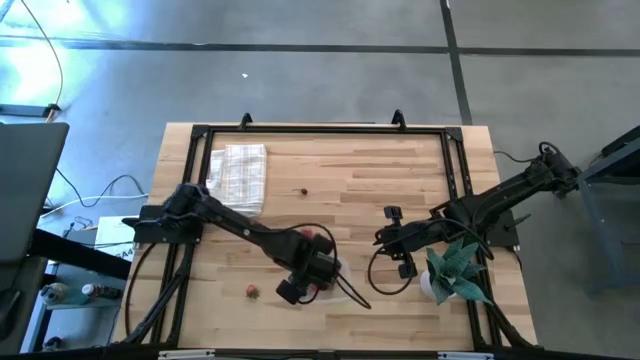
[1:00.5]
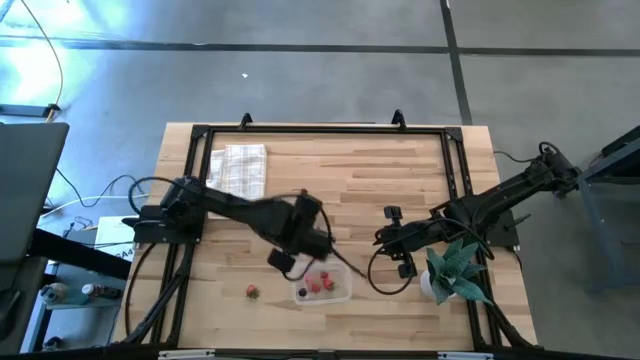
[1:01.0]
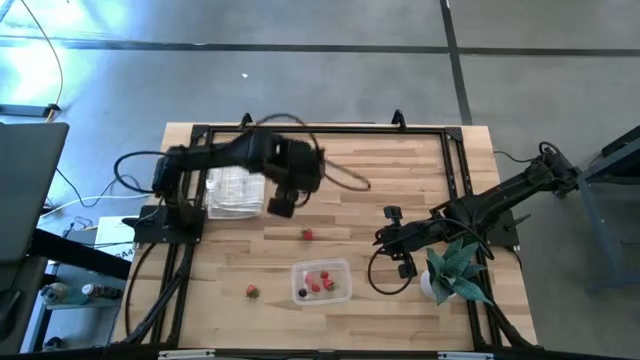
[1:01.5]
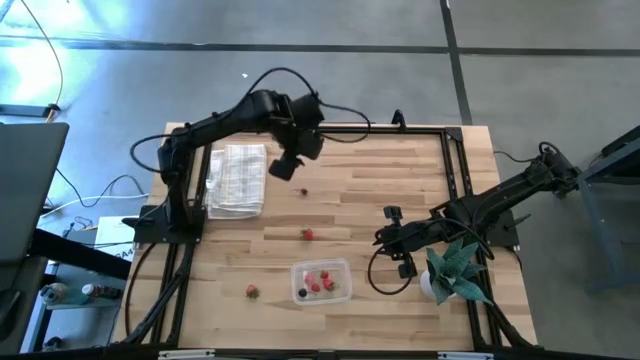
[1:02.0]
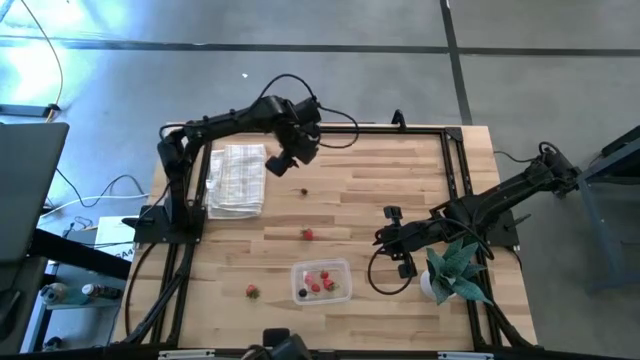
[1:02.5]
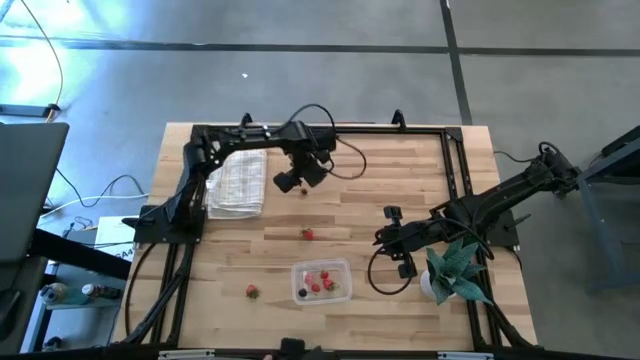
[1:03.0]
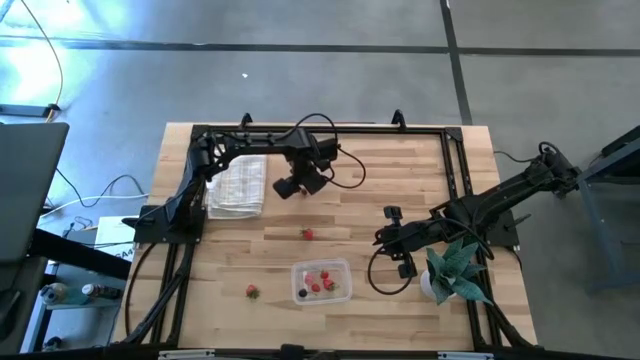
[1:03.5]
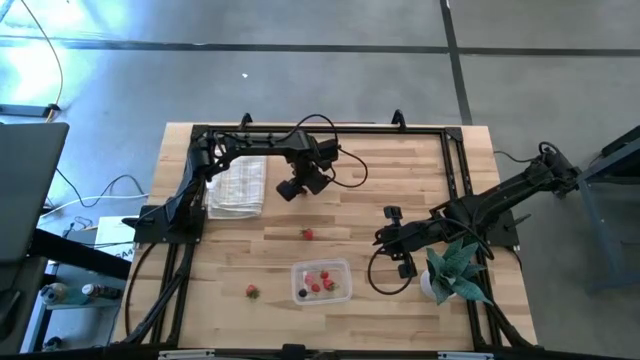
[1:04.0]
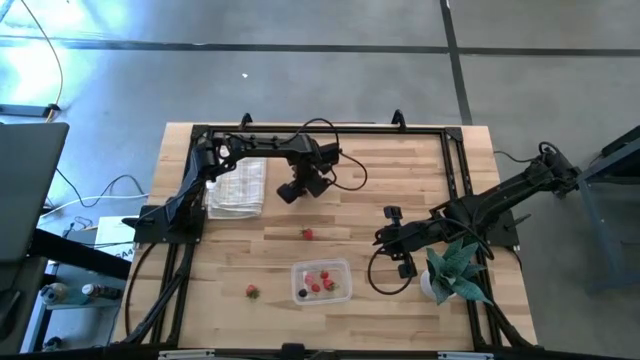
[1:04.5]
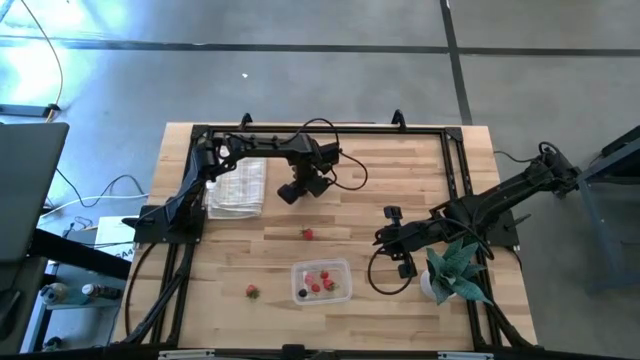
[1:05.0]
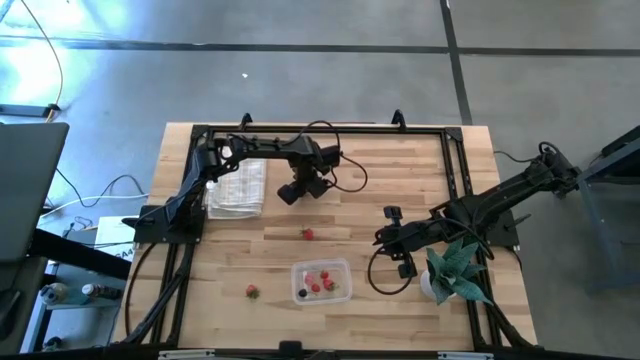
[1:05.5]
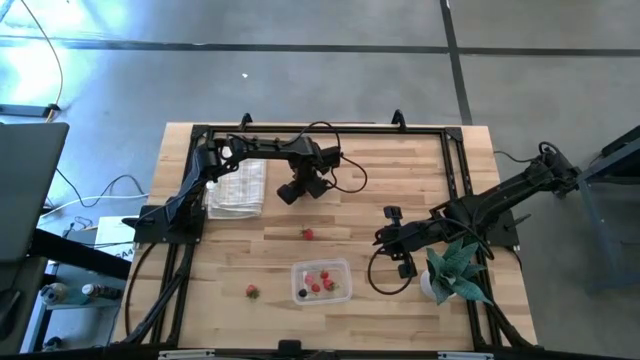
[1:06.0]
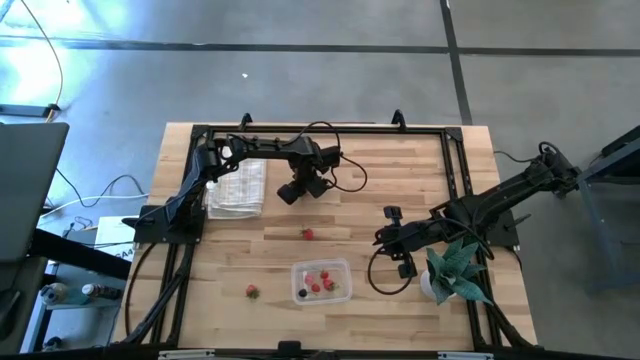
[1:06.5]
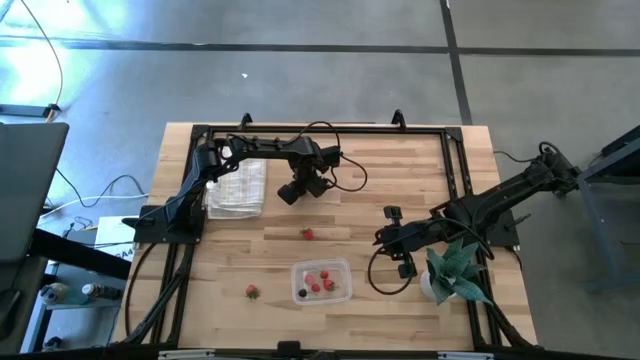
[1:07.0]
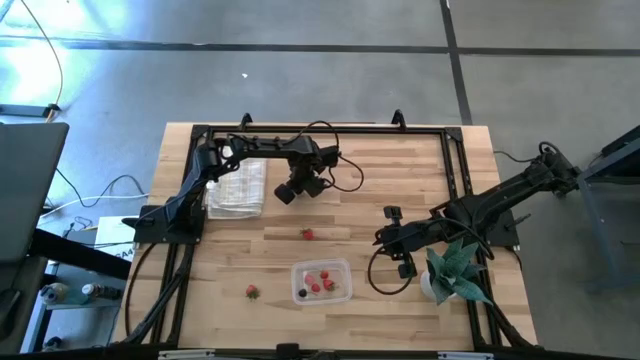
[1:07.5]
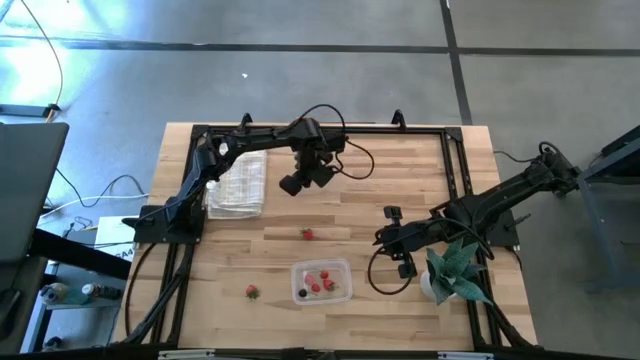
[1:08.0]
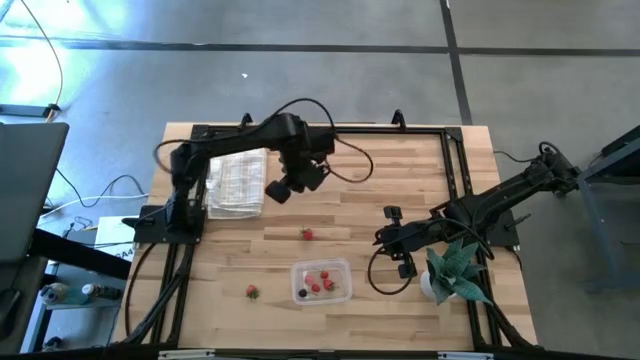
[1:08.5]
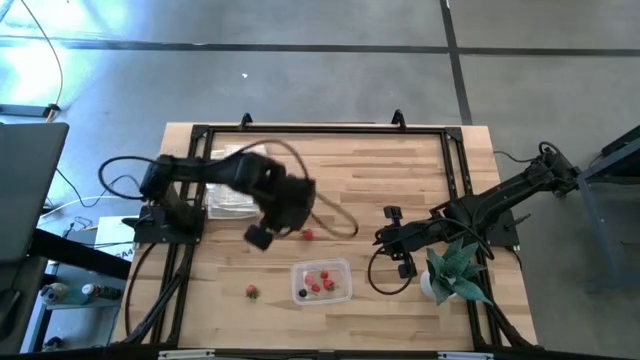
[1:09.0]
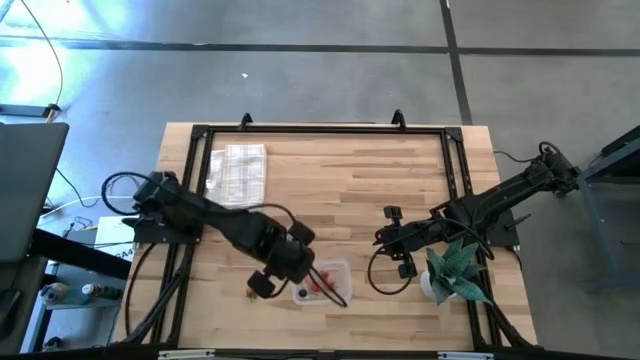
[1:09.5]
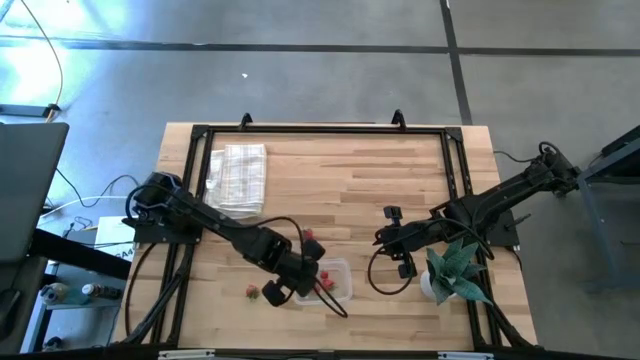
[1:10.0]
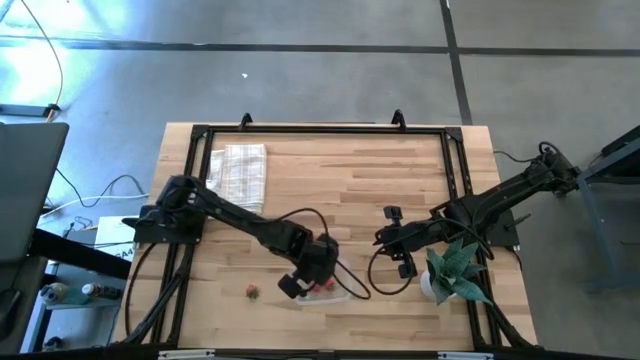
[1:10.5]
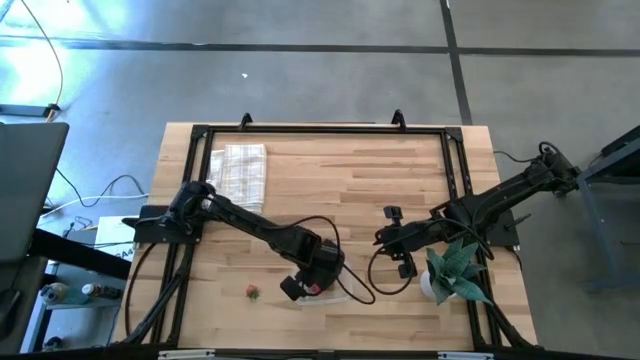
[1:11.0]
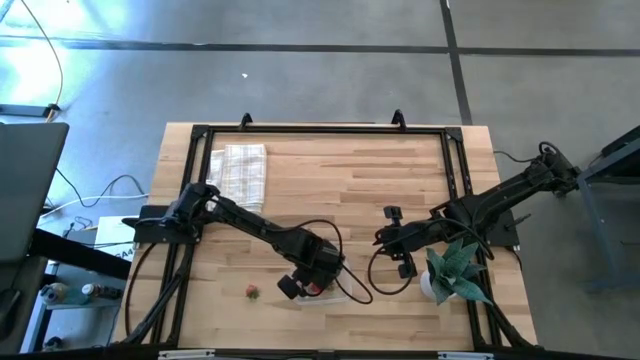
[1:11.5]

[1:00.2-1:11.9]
Task: Pick and placing Produce into tupperware
Put the red cherry into the transparent bin

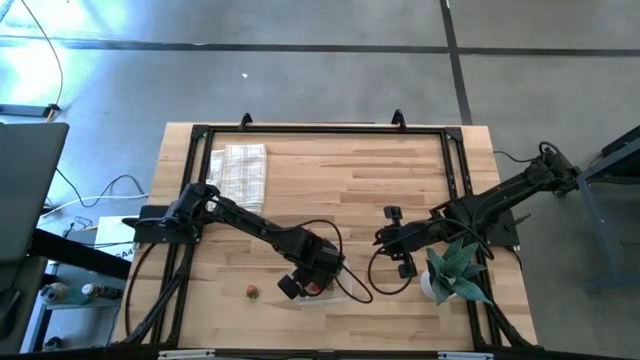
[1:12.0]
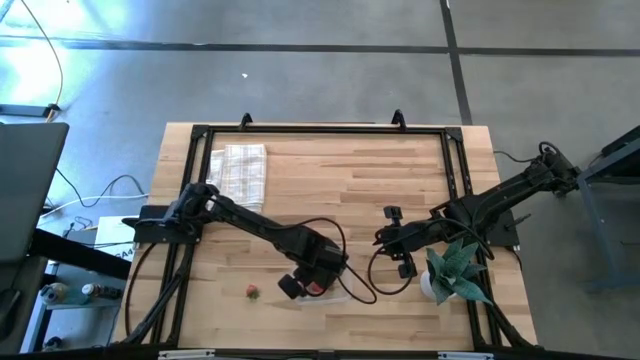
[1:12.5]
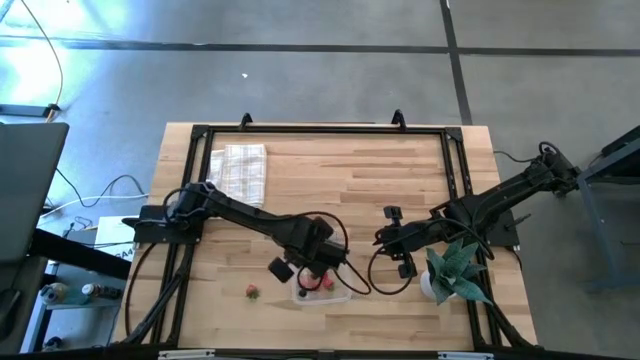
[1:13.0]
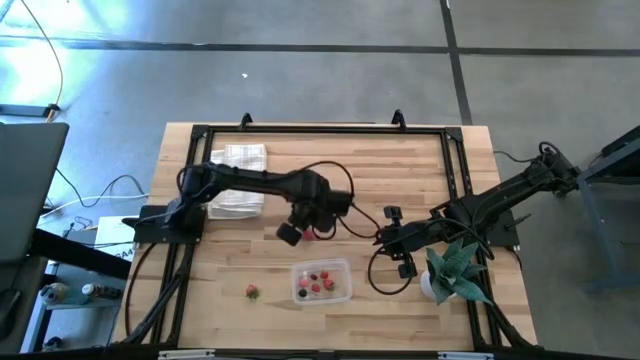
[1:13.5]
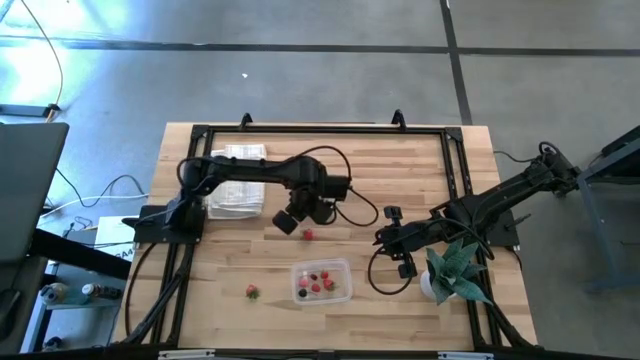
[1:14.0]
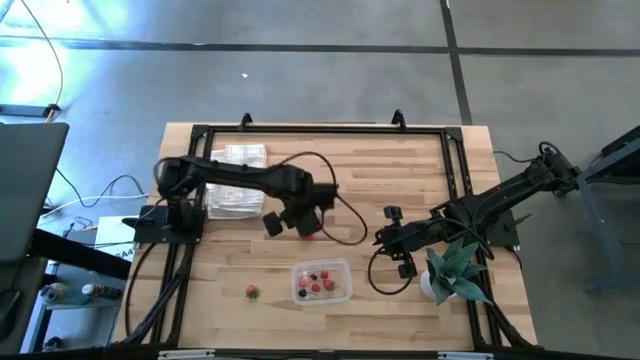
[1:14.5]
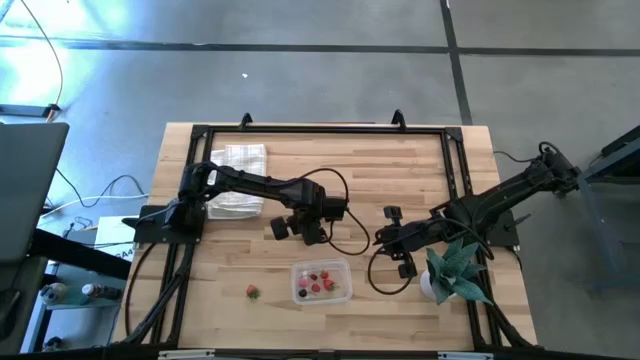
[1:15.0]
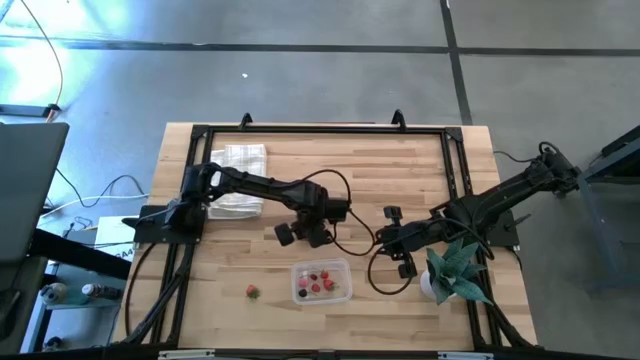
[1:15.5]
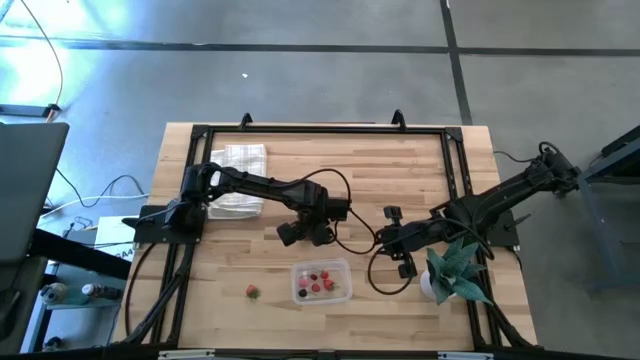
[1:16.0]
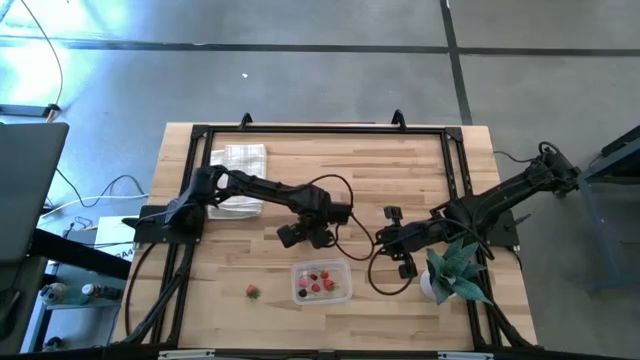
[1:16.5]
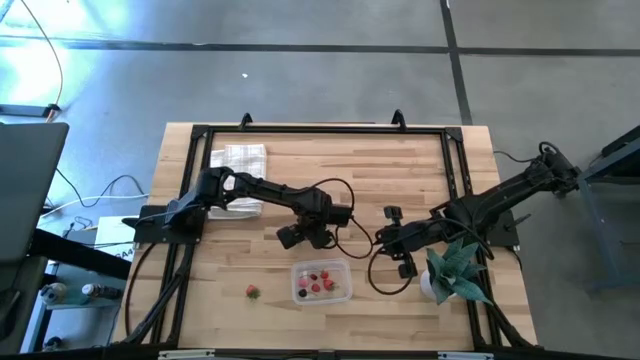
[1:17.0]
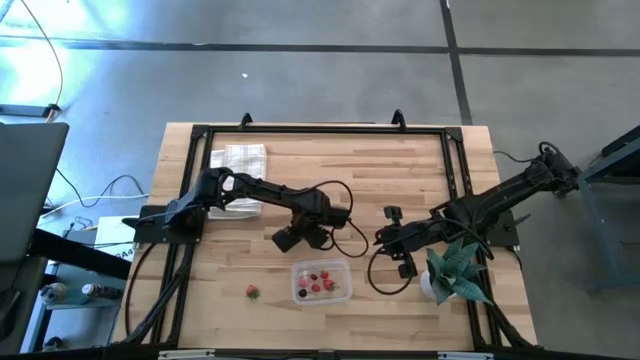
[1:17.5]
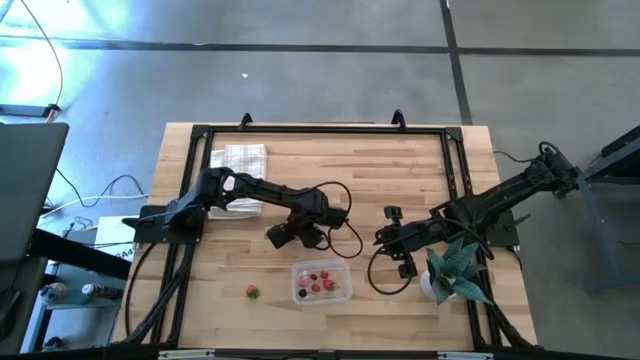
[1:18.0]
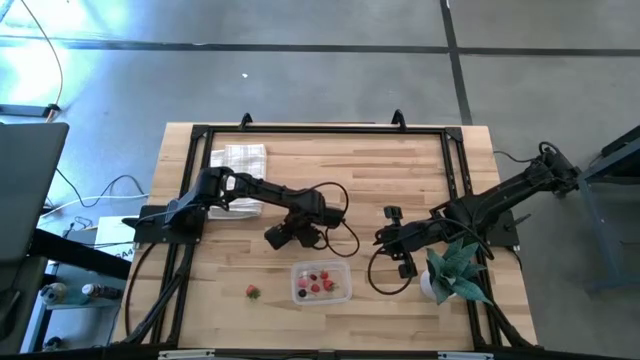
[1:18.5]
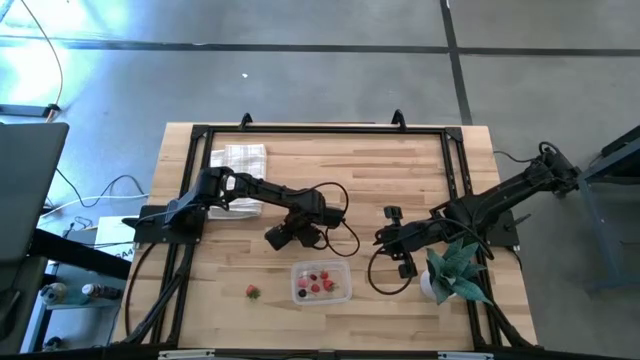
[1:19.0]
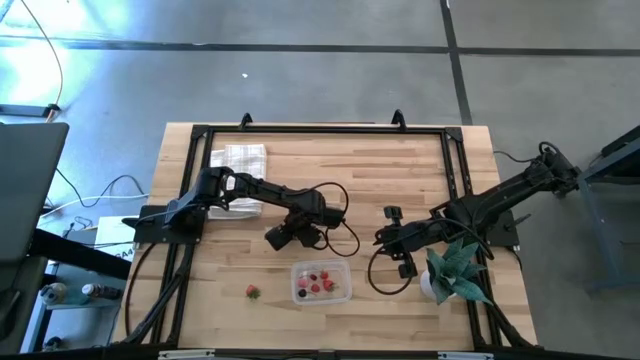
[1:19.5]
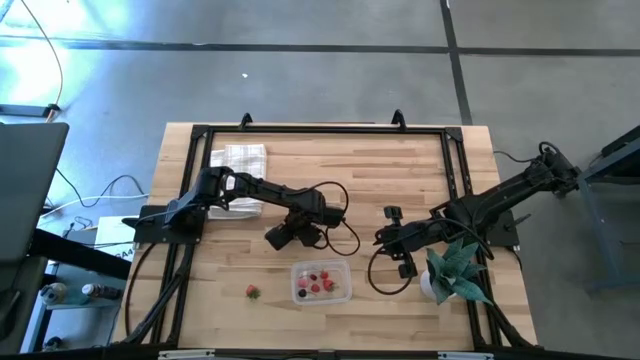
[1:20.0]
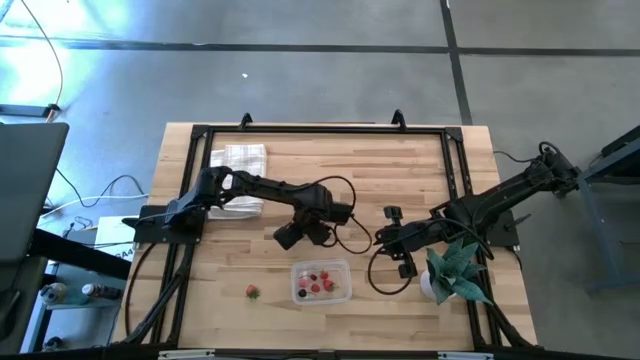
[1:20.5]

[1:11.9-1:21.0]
Put the red strawberry into the transparent bin

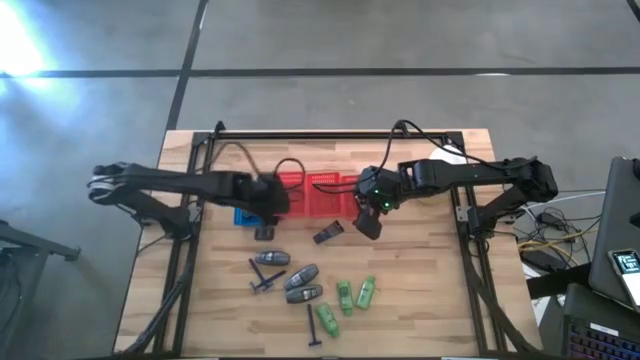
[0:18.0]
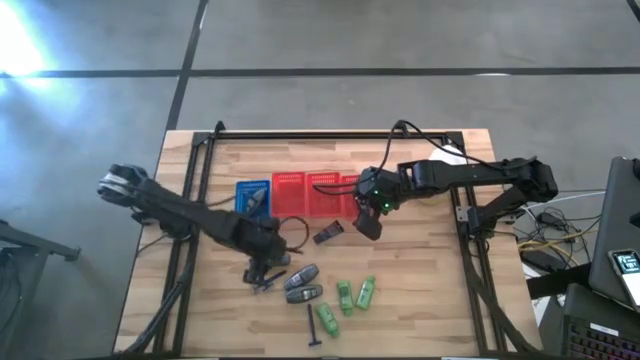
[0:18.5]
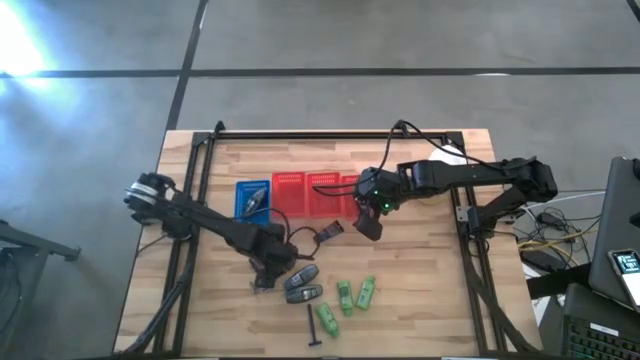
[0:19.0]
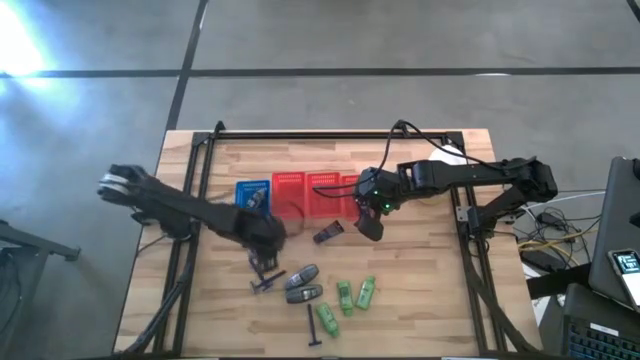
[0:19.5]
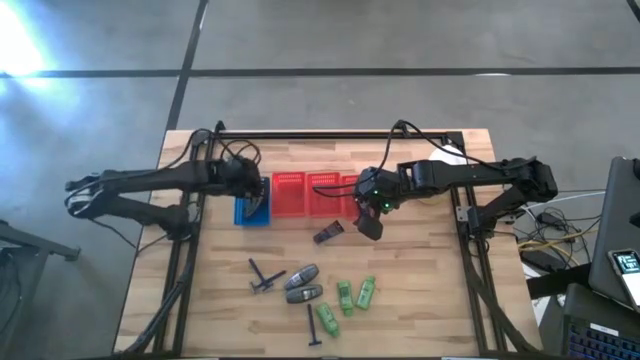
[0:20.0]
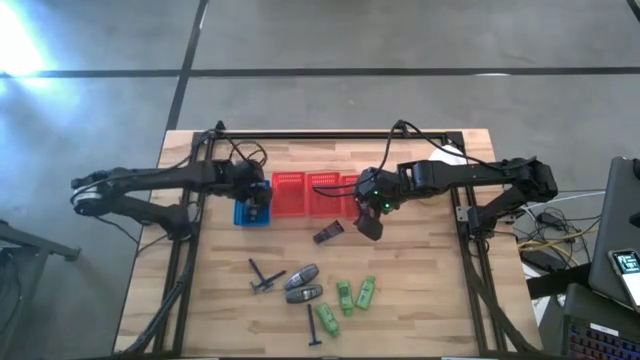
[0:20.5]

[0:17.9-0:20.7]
Task: Pick & Place Travel size toiletries
Put the gray deodorant into the blue bin
